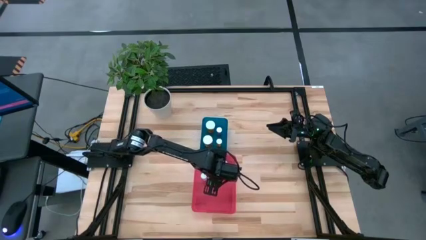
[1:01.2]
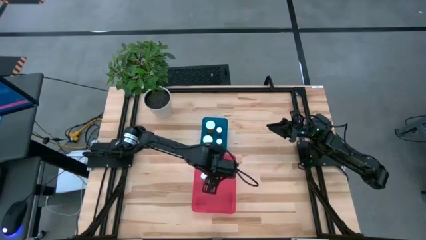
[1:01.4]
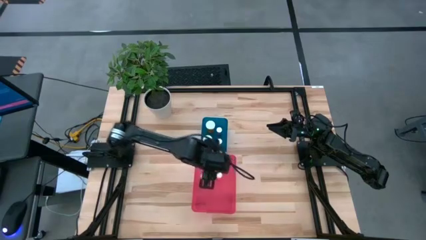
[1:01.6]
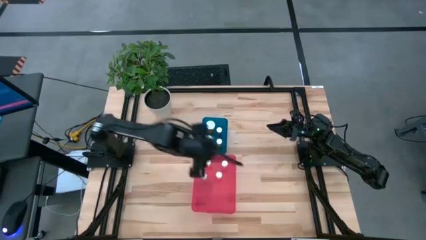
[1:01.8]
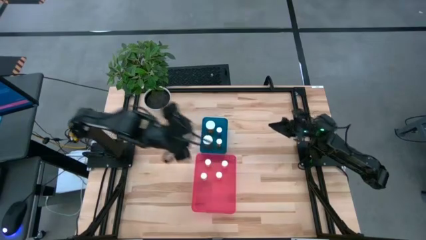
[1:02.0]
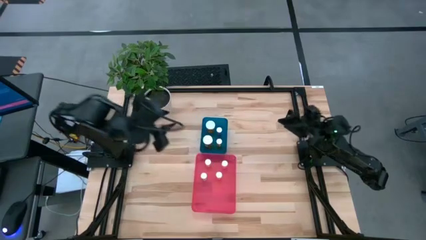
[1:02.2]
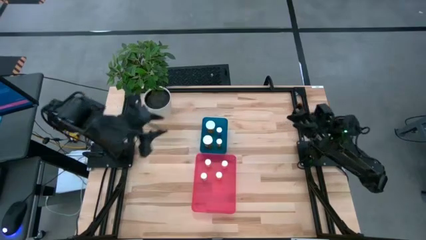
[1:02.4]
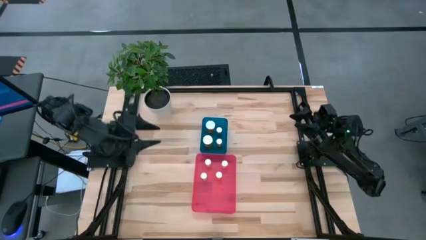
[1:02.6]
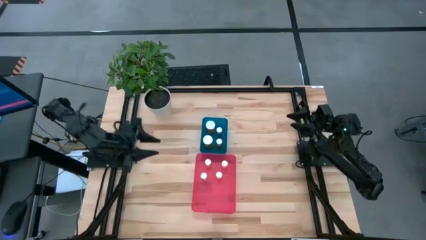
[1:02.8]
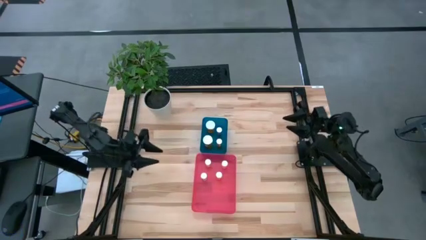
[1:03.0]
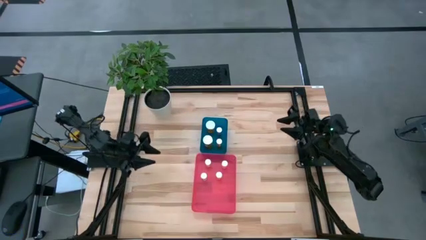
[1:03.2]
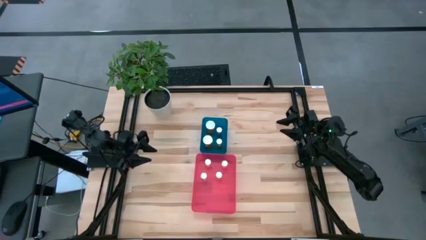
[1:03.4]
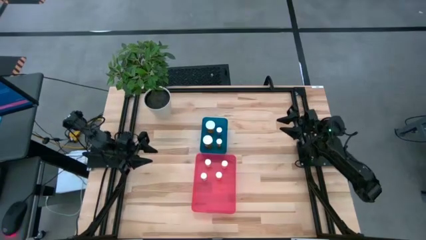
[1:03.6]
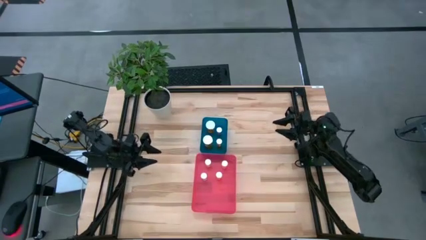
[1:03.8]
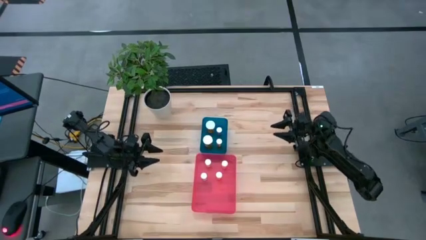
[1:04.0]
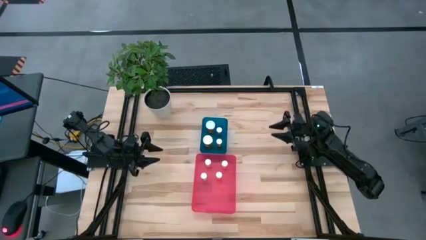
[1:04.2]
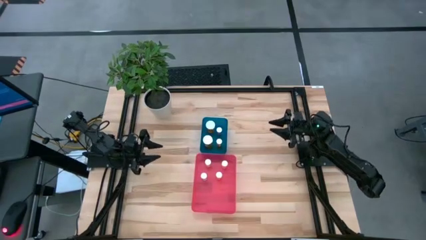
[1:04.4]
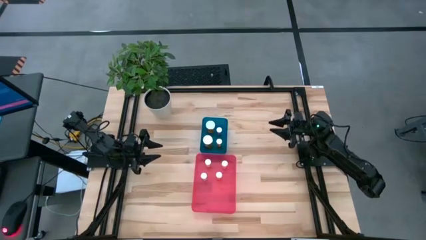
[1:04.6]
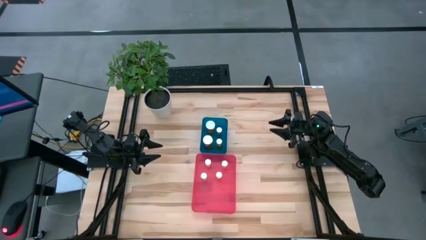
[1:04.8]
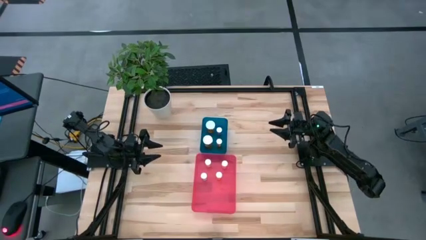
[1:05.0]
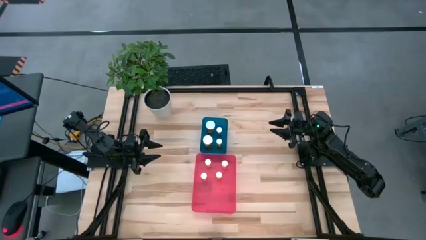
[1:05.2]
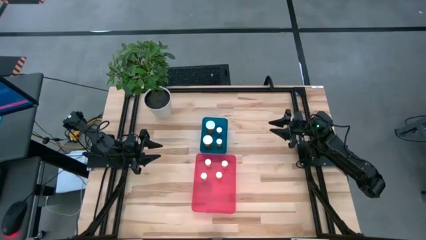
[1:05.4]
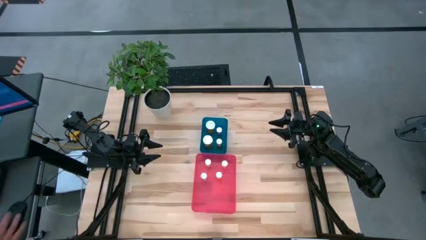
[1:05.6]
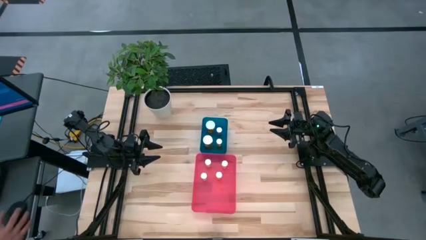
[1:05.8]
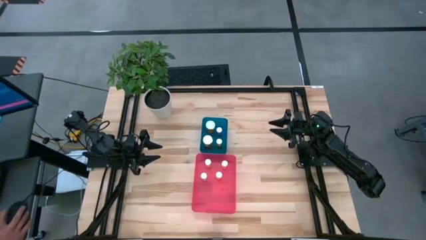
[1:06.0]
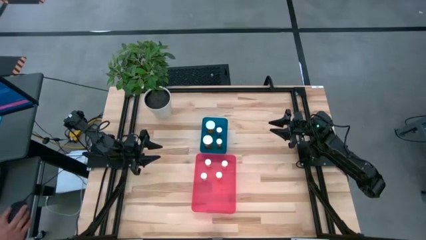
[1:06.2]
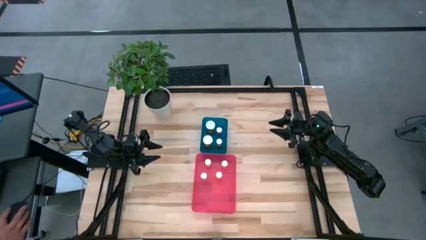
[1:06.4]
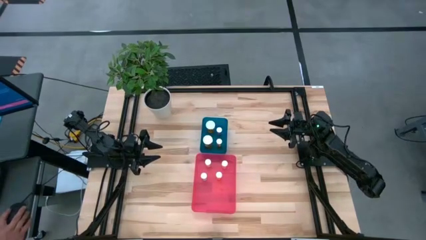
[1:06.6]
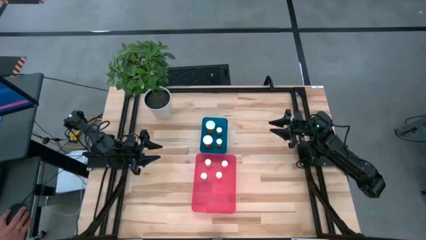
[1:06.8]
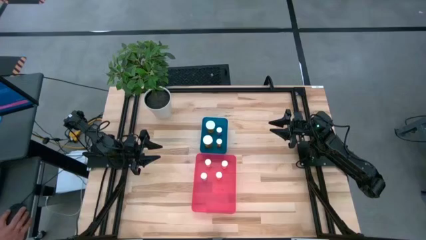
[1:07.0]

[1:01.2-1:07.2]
Task: Pick and place medicine bottles into bin by pill shape (circle, oval)
Return to Home Position

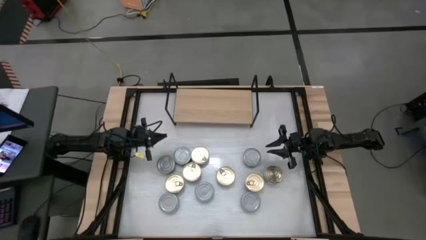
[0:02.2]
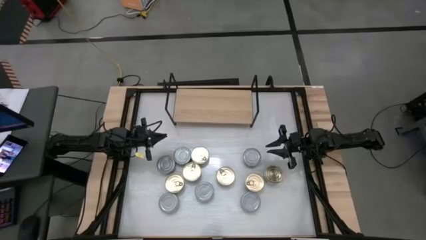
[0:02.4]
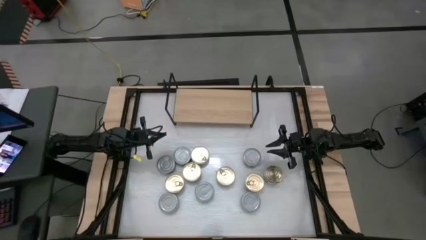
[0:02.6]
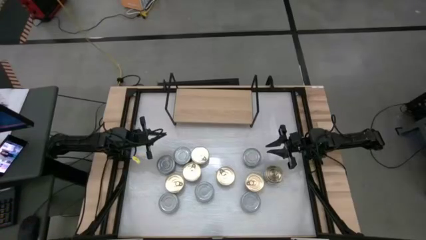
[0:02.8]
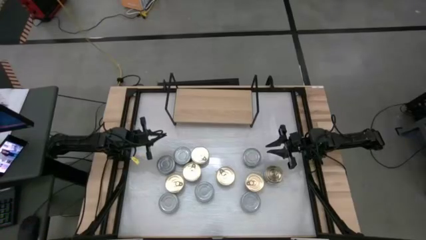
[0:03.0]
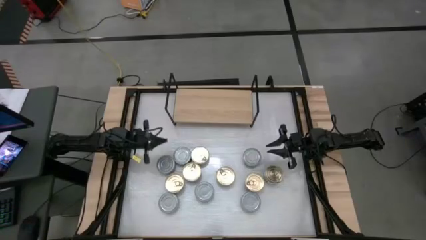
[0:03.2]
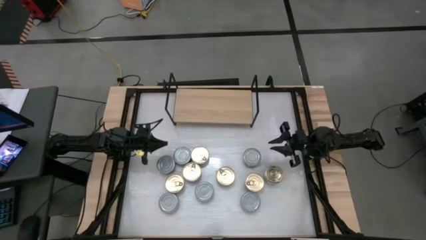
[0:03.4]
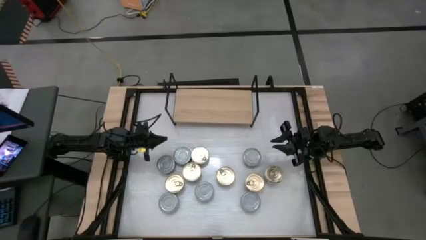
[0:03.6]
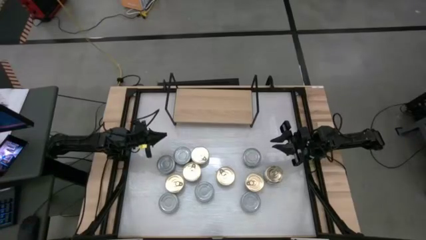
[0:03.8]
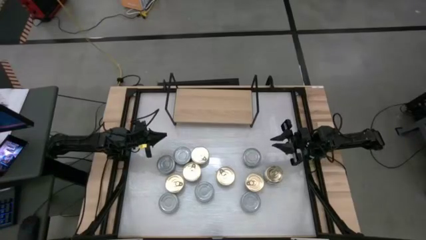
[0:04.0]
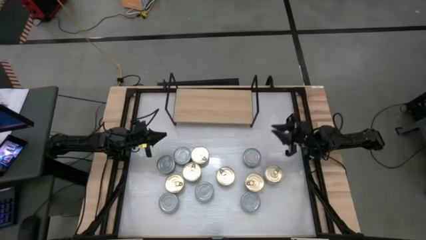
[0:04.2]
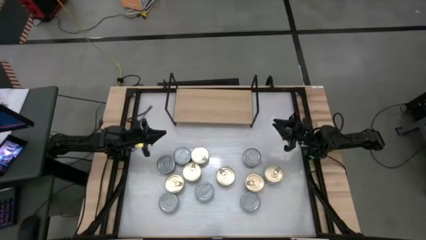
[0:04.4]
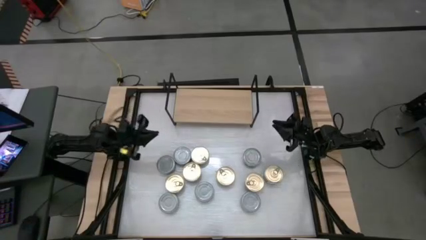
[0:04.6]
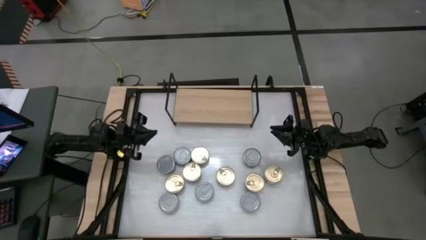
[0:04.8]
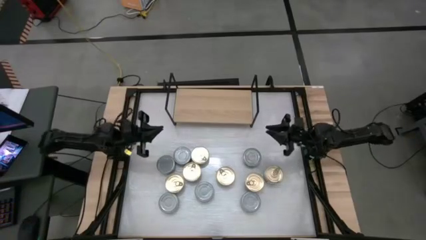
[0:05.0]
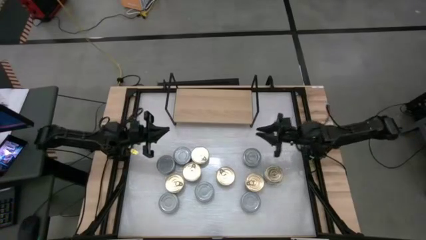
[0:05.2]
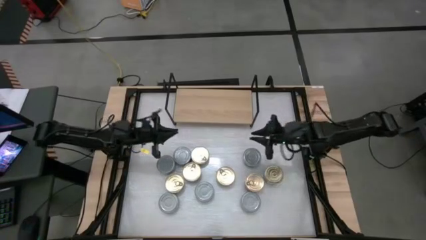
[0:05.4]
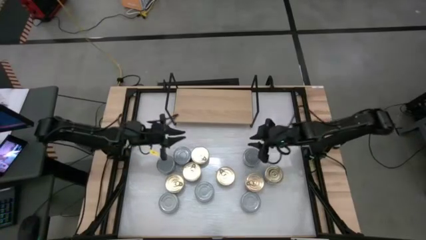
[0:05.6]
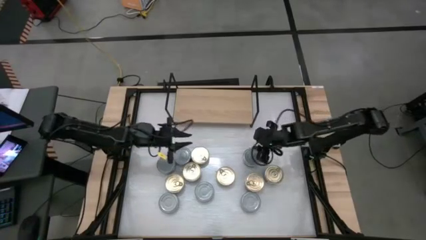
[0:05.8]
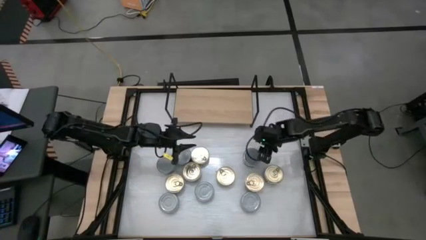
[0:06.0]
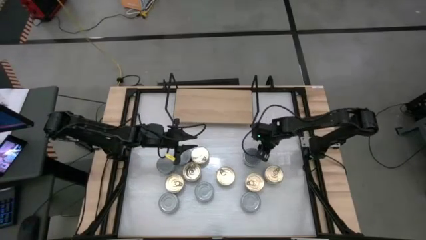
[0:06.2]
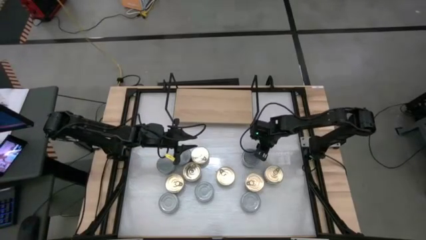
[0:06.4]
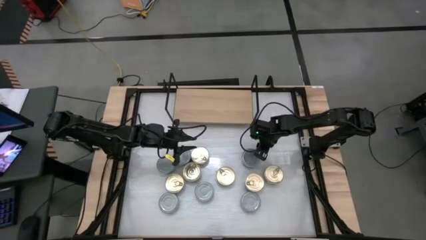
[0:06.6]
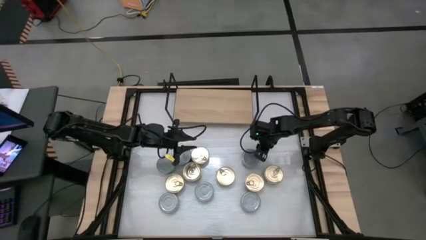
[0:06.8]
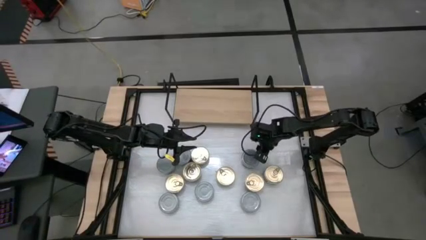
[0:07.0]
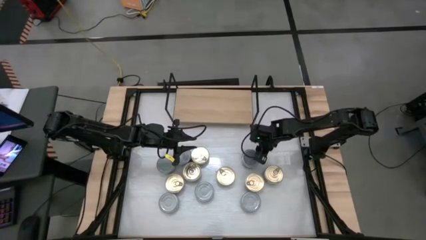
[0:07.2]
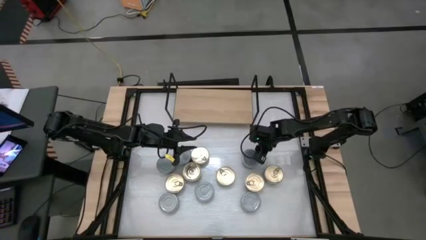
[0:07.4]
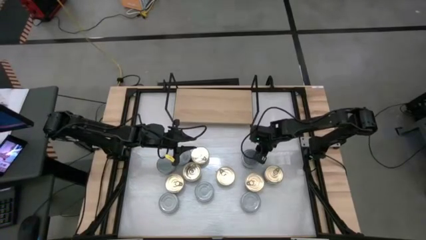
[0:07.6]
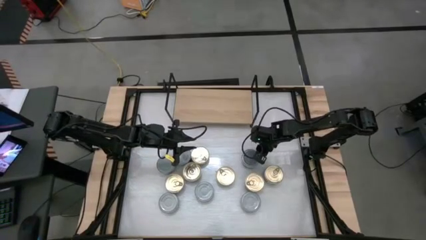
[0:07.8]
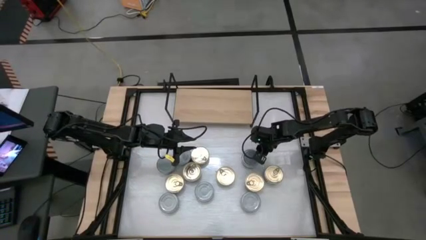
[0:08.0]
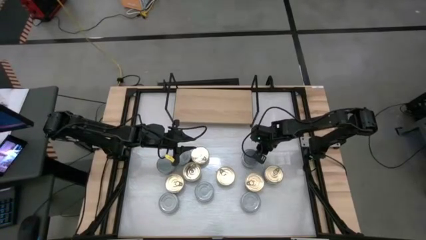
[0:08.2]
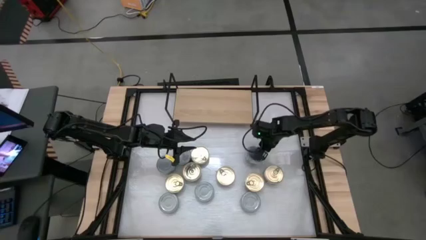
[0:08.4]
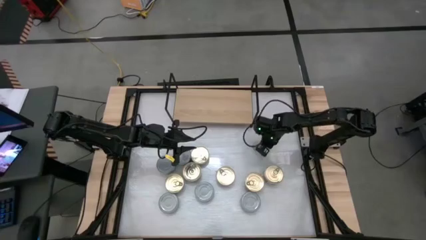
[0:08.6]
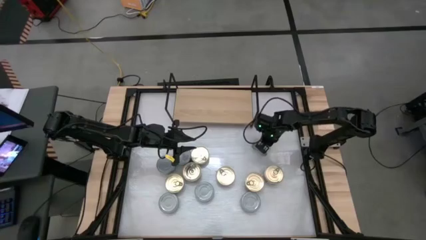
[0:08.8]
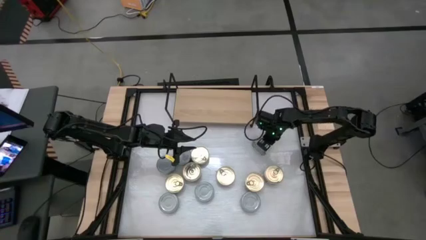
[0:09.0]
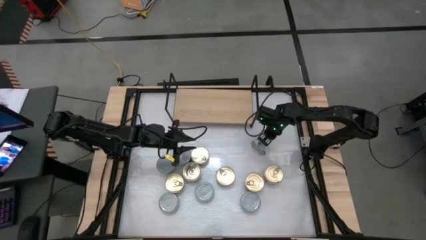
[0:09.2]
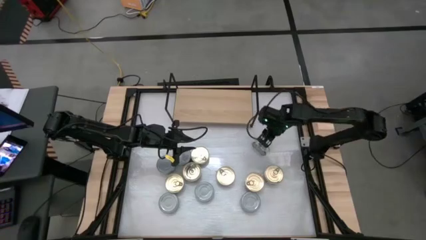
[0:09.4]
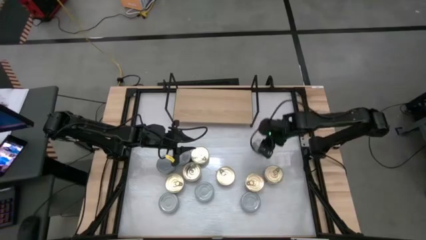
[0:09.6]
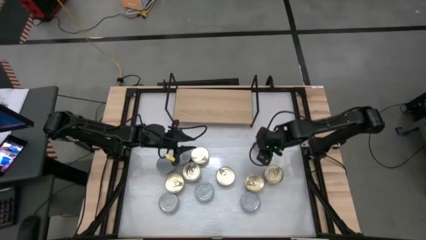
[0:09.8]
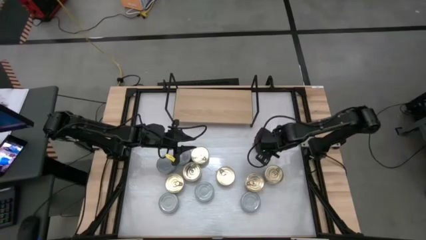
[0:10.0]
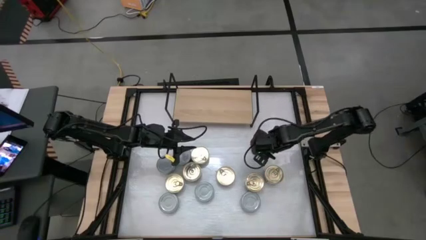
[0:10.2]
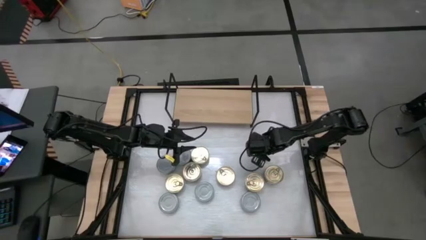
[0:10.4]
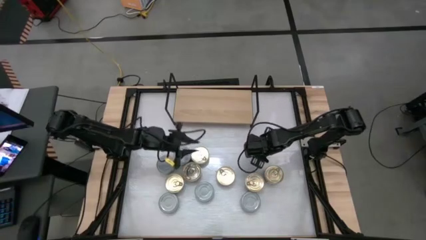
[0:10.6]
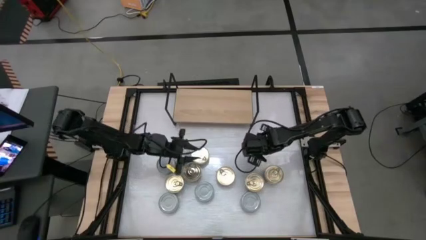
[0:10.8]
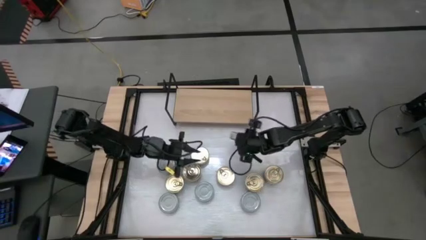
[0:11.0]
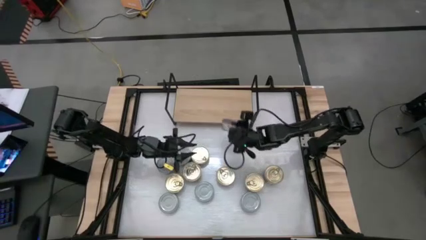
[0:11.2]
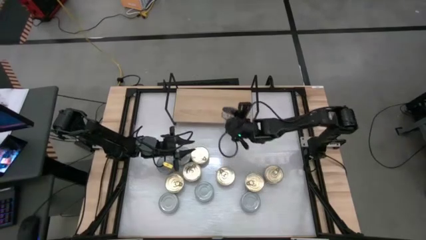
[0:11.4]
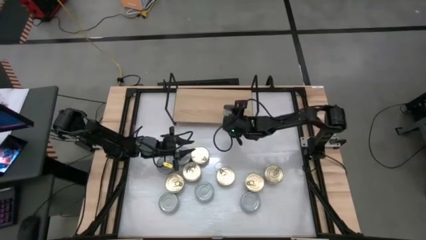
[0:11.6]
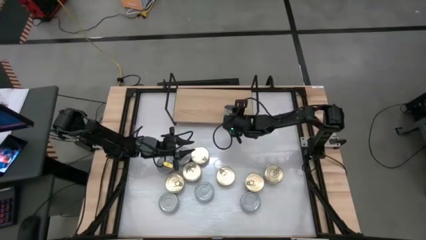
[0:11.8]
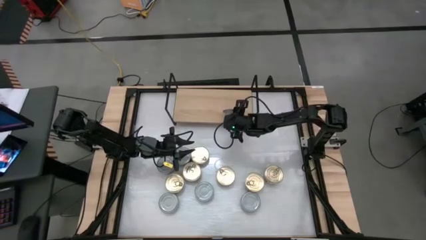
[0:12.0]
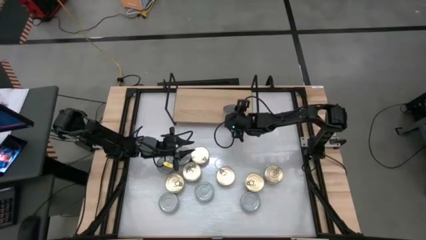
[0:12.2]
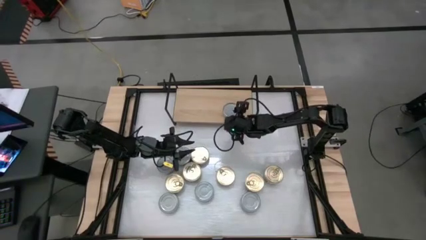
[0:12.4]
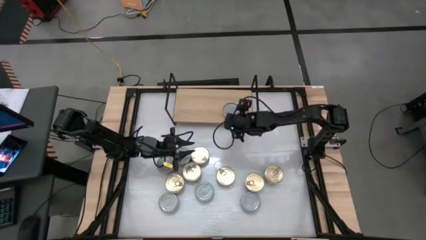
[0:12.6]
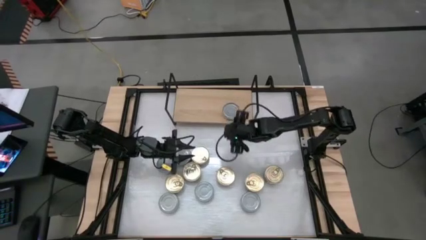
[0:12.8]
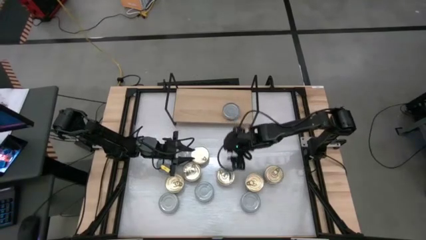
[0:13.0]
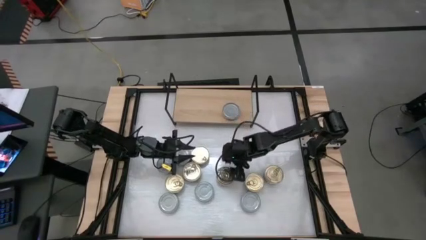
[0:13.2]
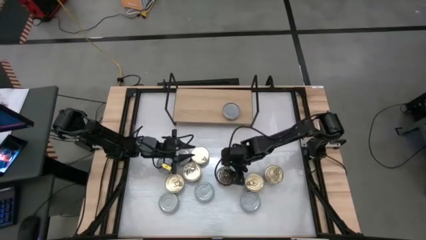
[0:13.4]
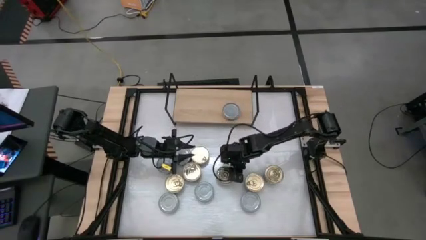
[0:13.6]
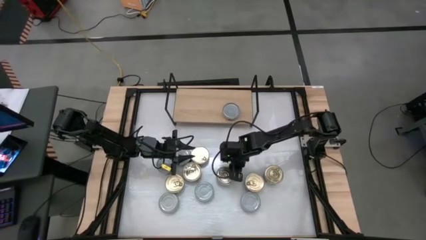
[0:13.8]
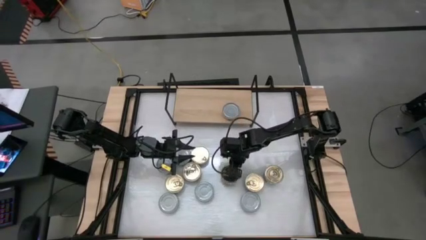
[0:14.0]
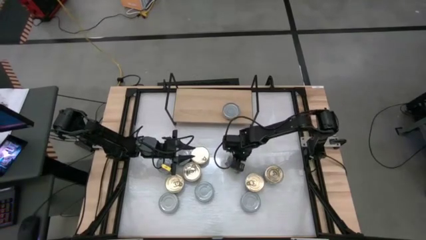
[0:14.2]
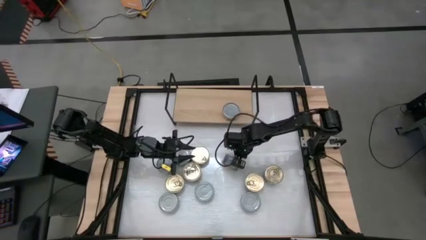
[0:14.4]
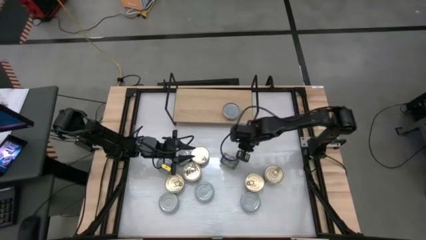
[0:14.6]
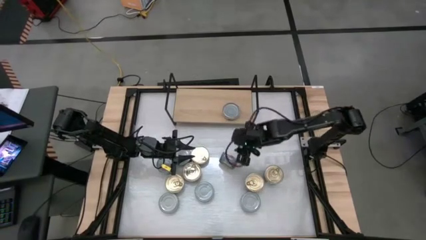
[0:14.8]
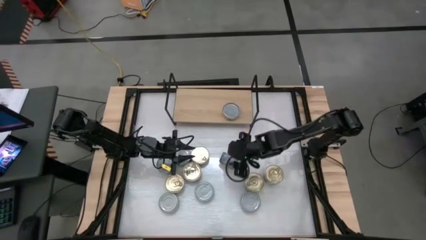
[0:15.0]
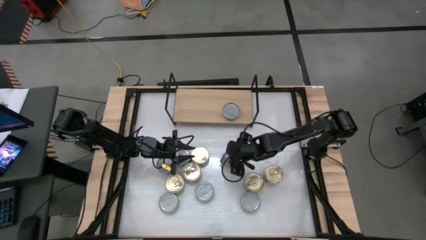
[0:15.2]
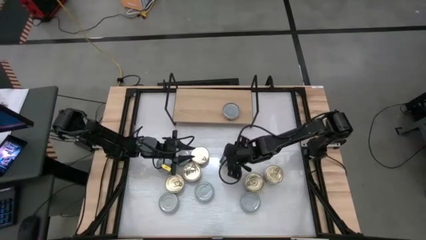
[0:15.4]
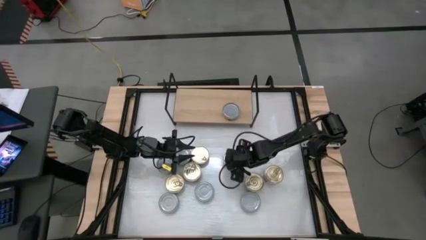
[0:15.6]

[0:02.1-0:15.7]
Task: Stack canned seafood by type on shelf
Put the green tuna can on the shelf
